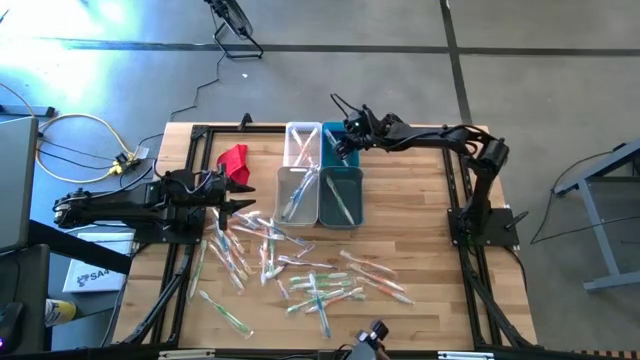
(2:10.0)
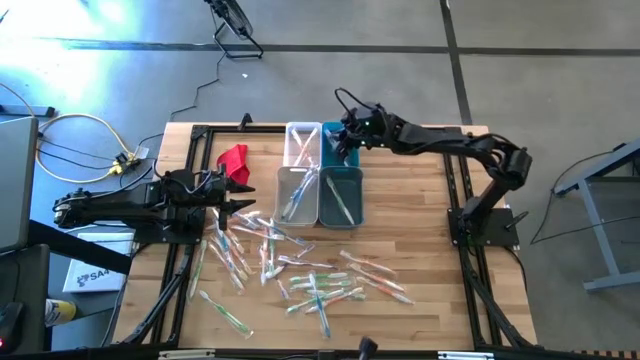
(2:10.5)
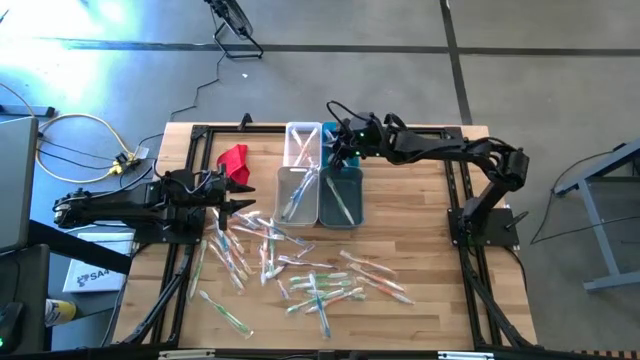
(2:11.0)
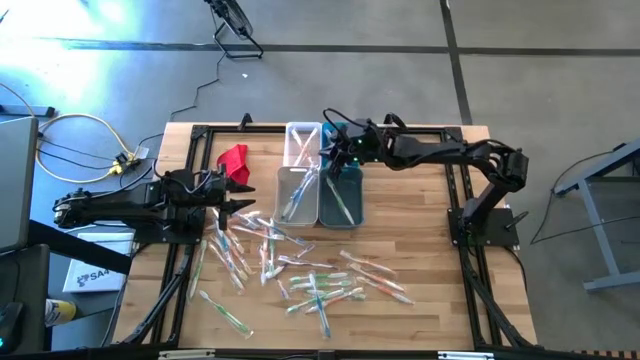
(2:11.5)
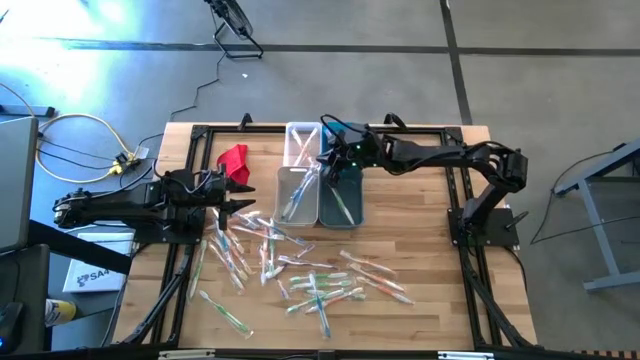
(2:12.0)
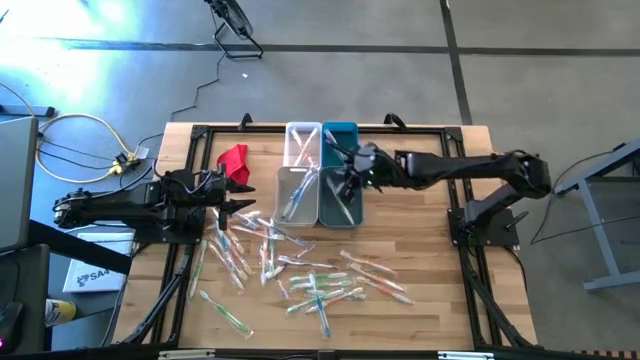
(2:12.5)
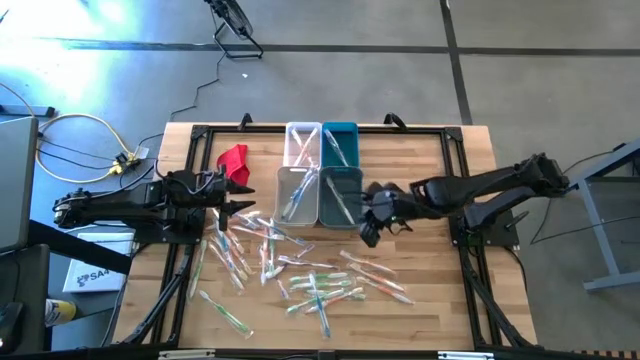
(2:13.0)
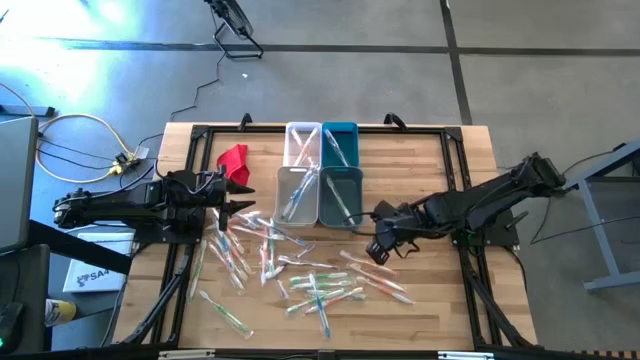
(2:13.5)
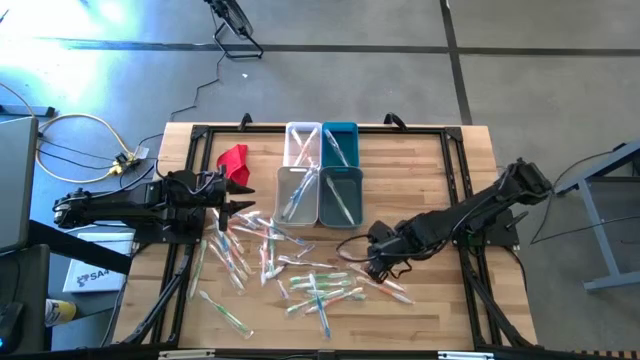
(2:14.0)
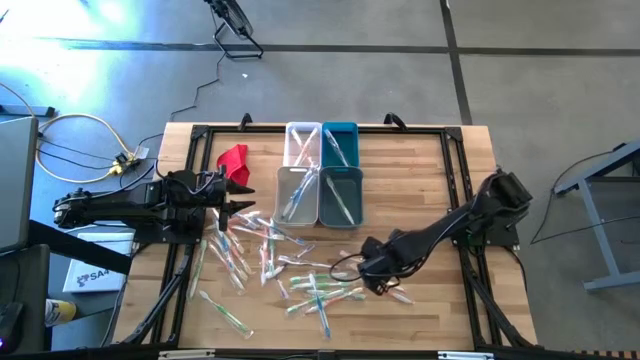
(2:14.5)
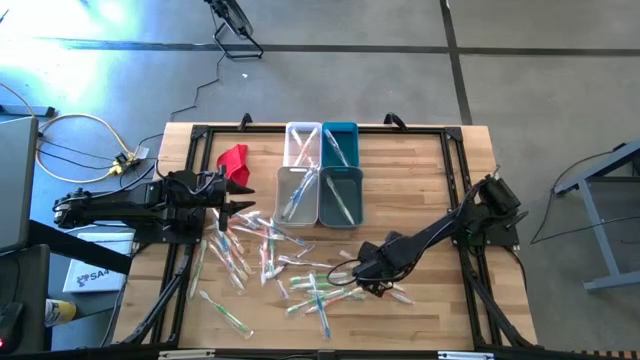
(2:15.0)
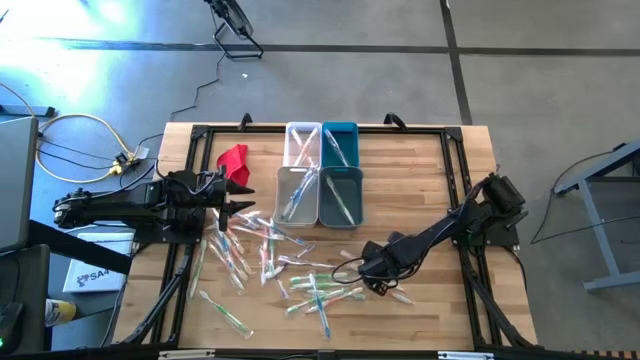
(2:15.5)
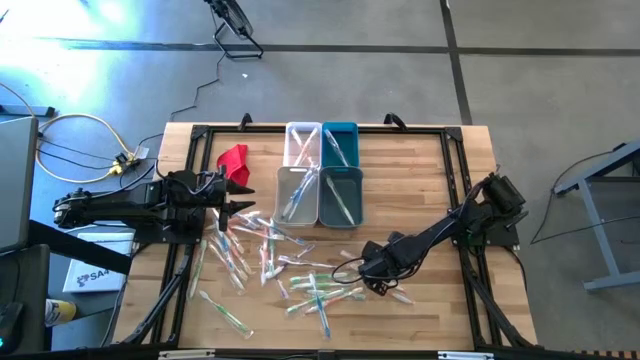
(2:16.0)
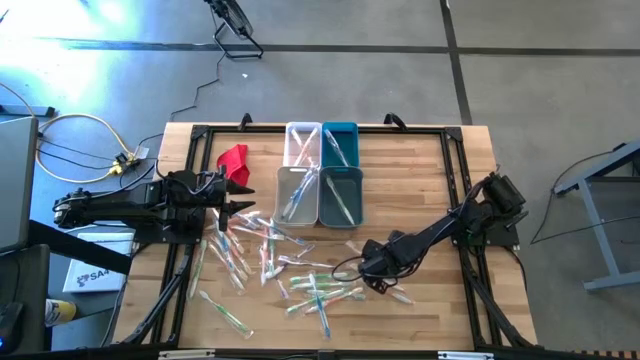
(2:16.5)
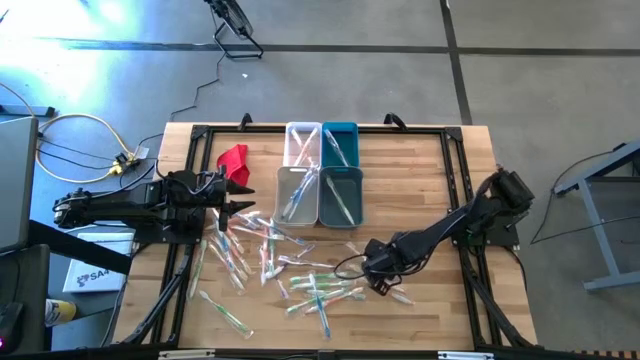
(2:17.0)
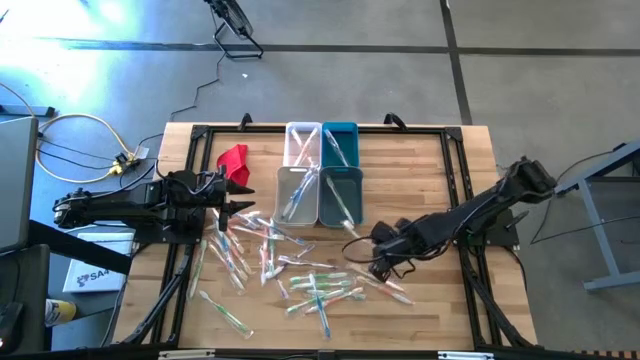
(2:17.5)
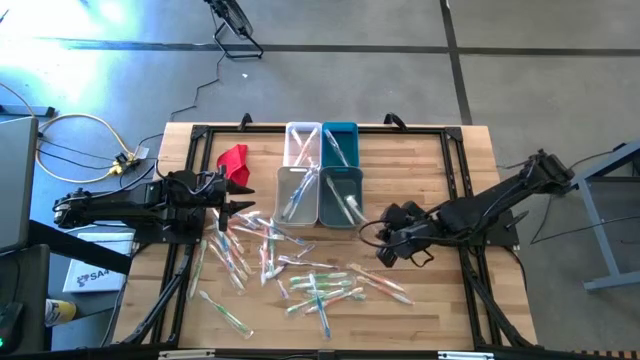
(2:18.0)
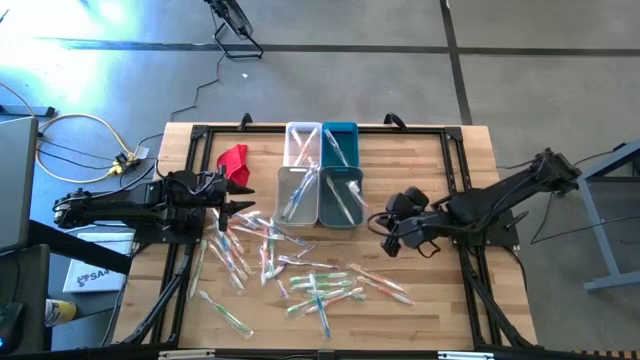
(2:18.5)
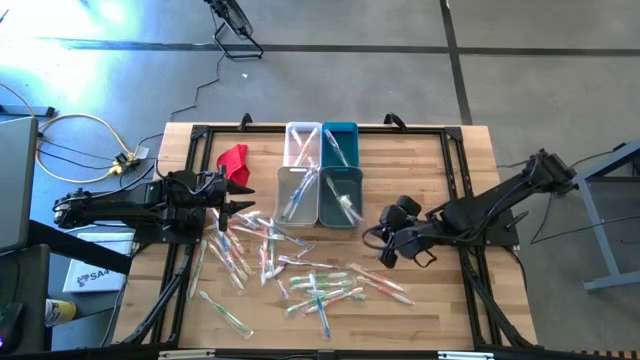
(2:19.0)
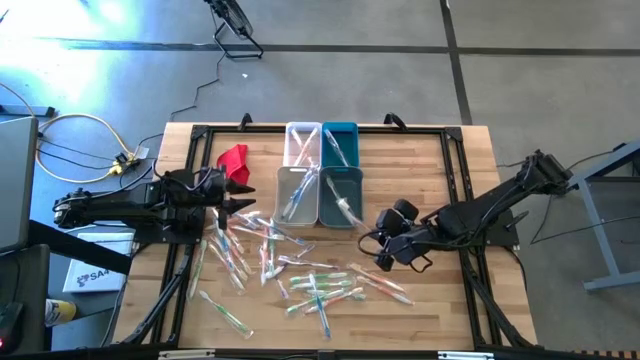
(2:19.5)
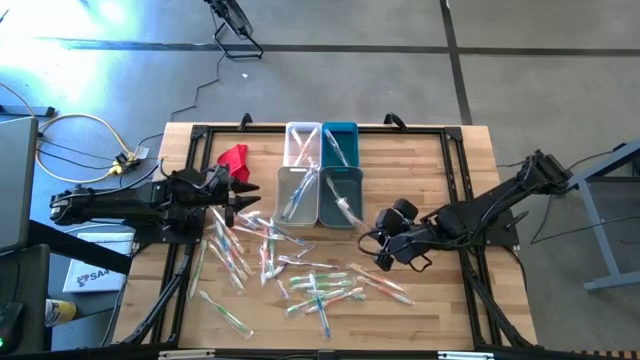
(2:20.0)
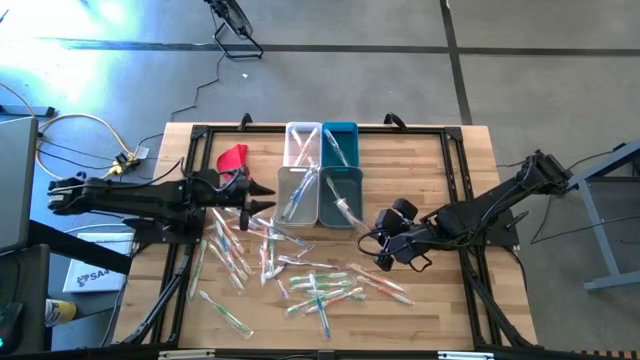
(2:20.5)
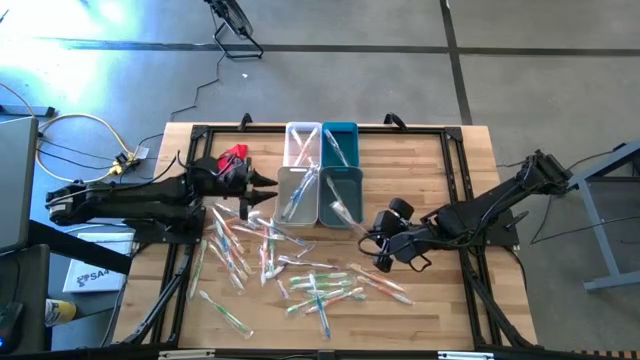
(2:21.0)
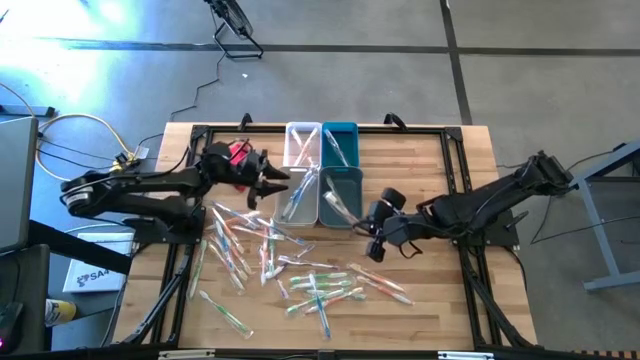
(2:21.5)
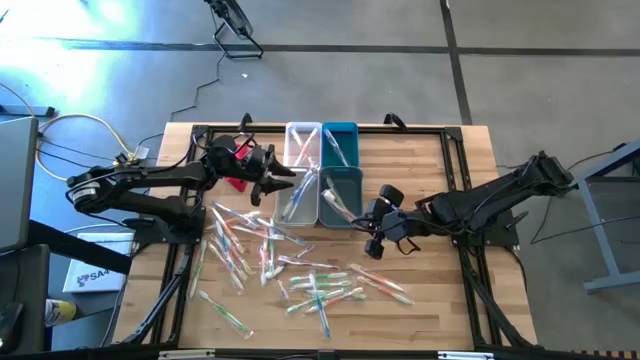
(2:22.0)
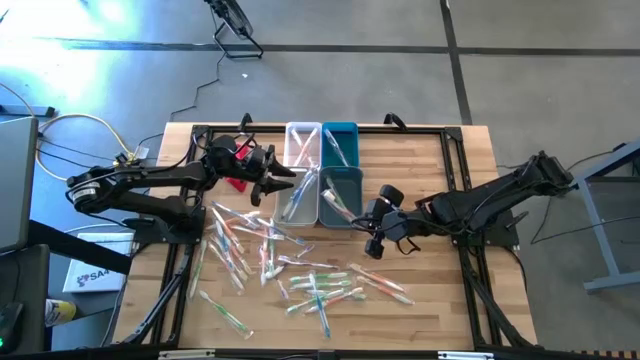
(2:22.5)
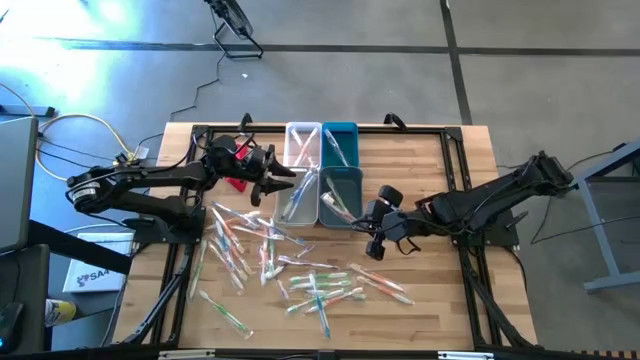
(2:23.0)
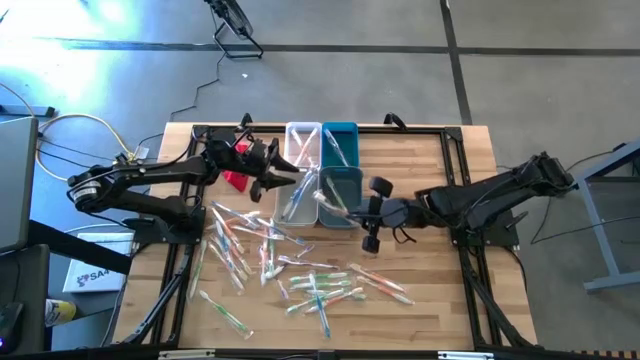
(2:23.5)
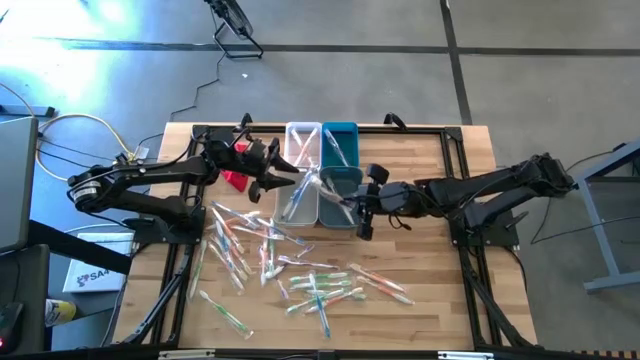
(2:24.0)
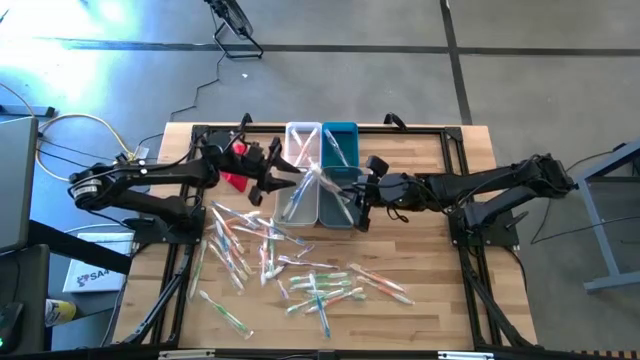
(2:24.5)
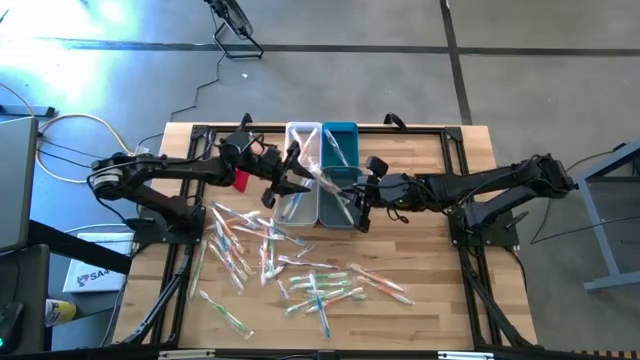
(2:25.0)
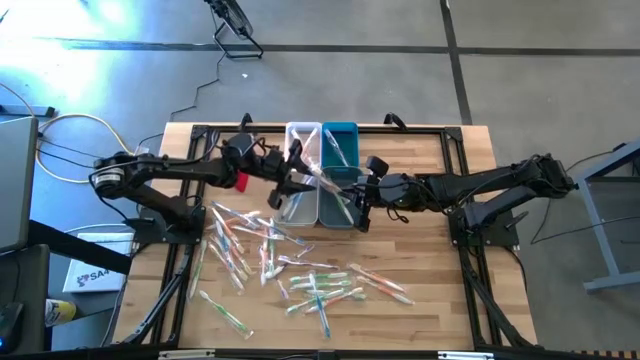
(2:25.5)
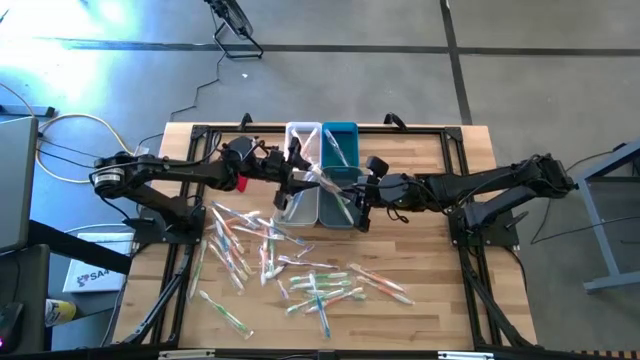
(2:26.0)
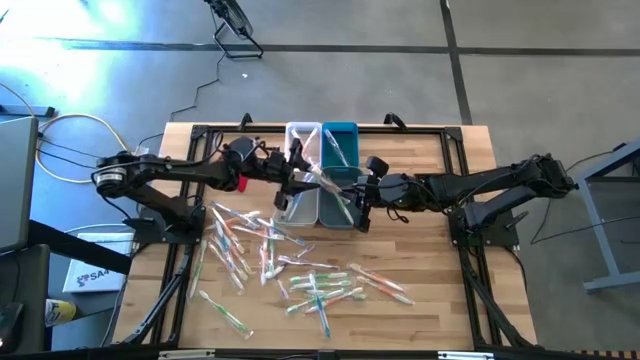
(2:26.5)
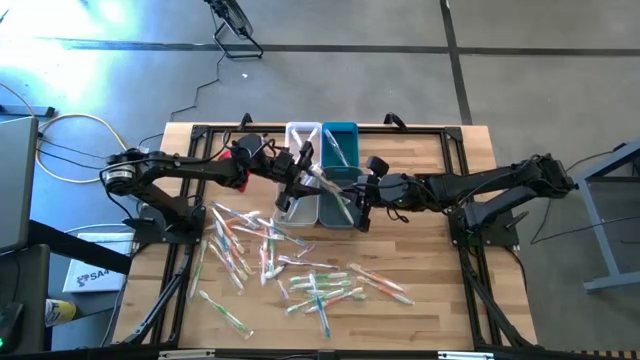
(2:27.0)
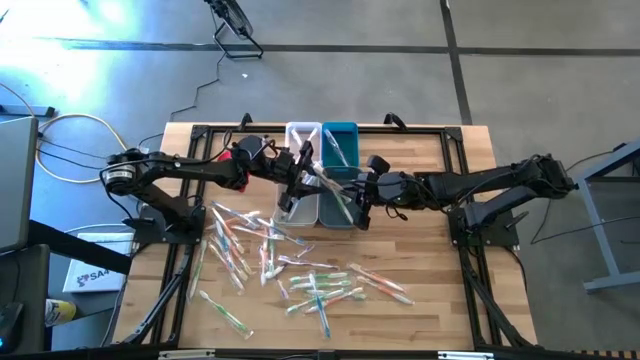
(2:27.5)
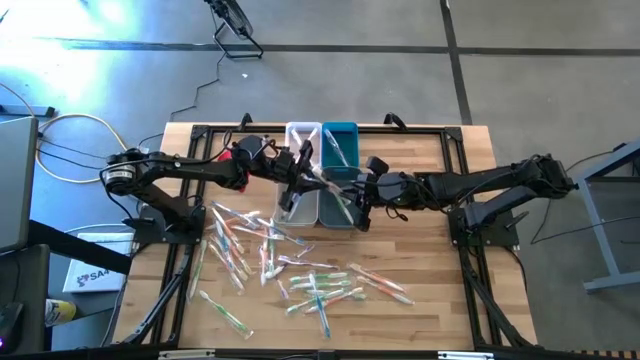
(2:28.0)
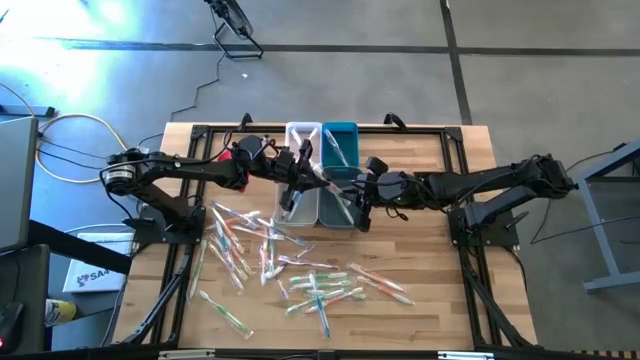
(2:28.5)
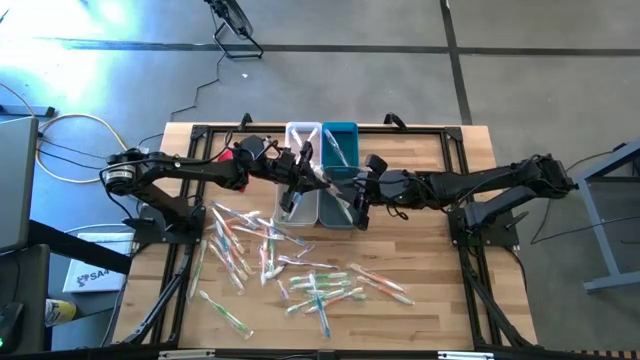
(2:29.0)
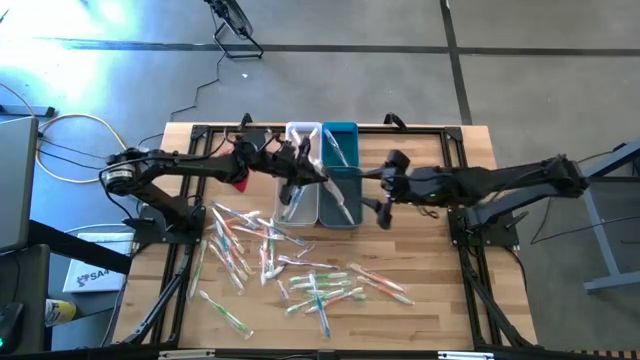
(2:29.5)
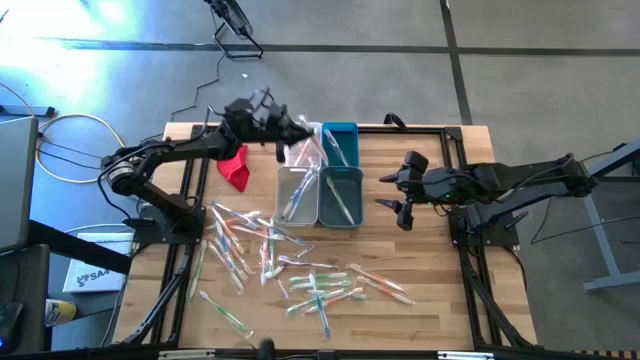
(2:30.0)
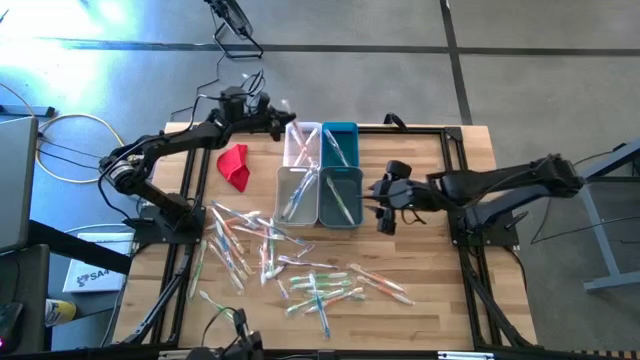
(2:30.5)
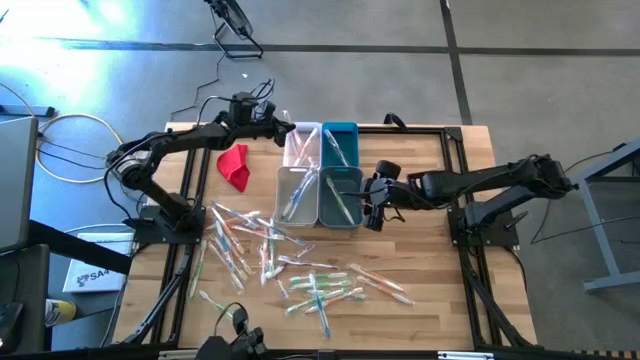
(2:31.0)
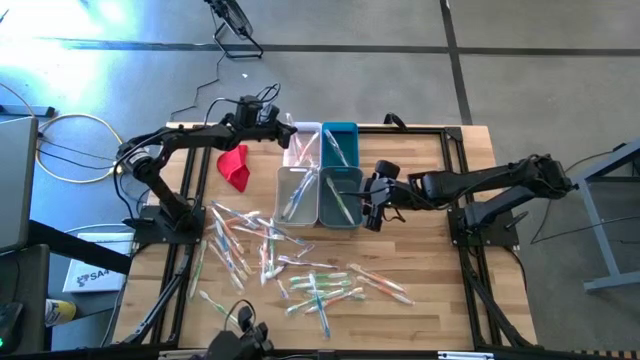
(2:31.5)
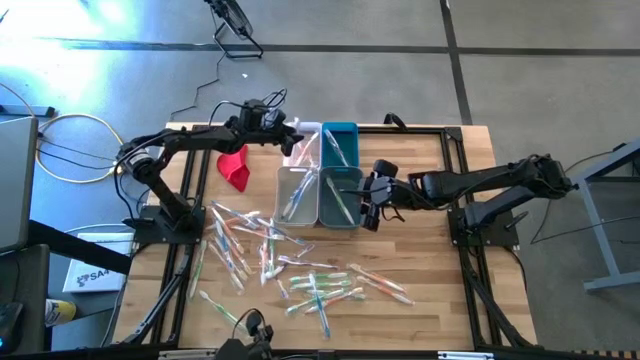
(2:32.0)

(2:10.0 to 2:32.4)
Task: Pick & Place Toothbrushes
Put the orange toothbrush into the transparent bin
